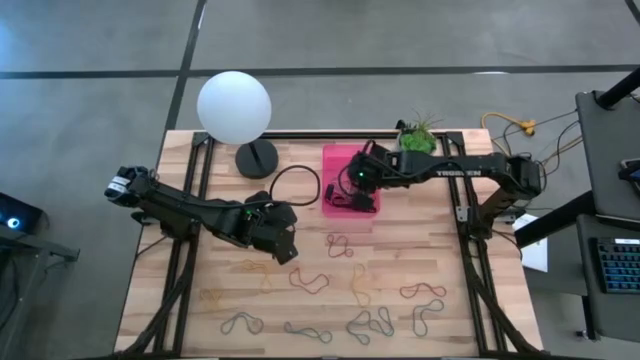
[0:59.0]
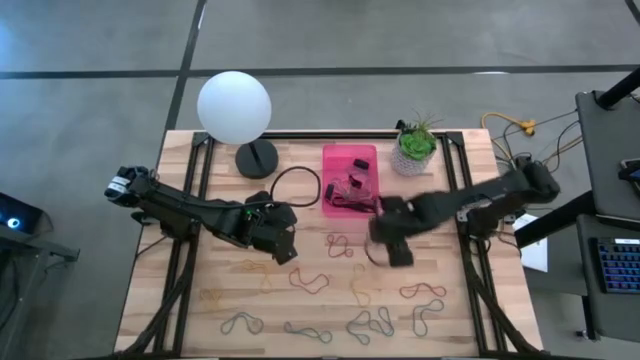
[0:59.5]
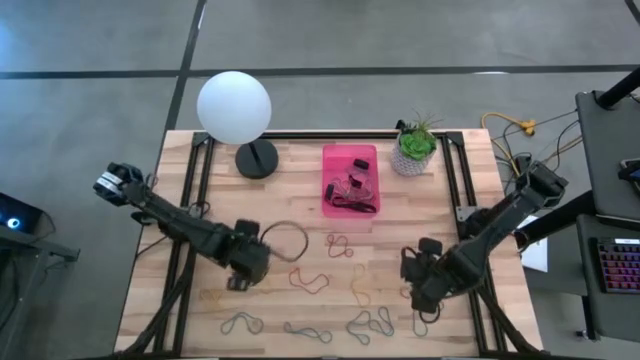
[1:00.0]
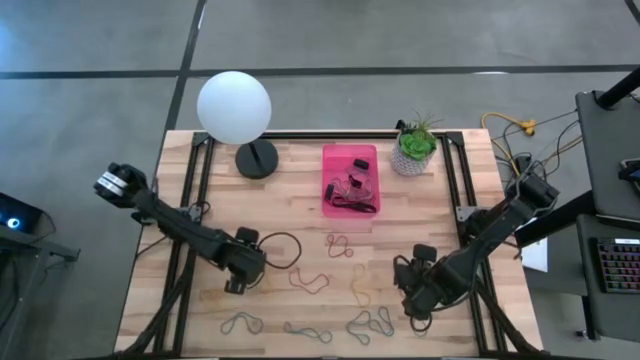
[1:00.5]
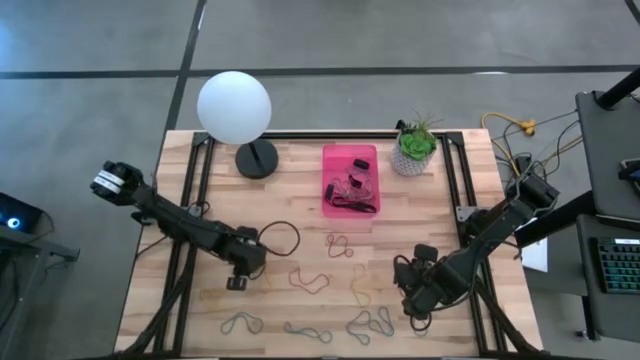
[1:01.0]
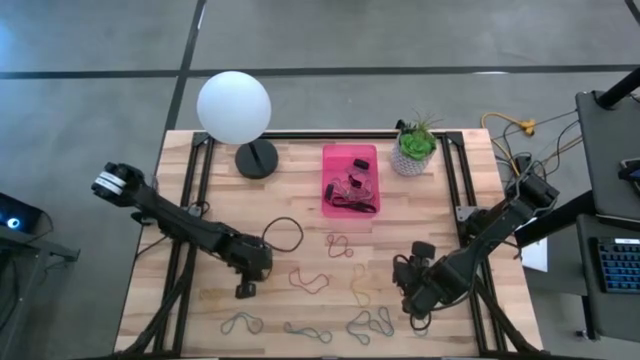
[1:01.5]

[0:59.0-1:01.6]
Task: Pick and place rubber bands into bin
Put the yellow rubber band into the pink bin

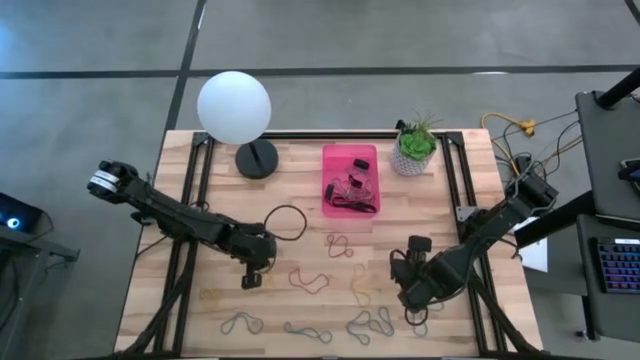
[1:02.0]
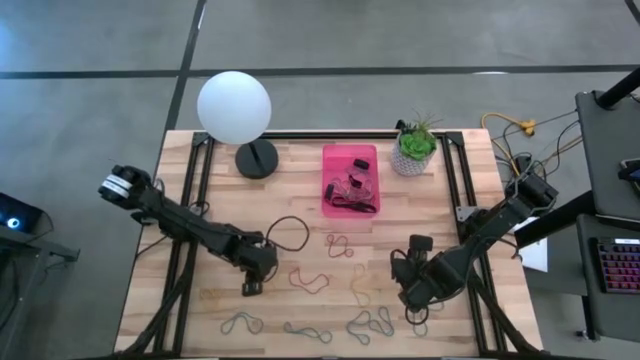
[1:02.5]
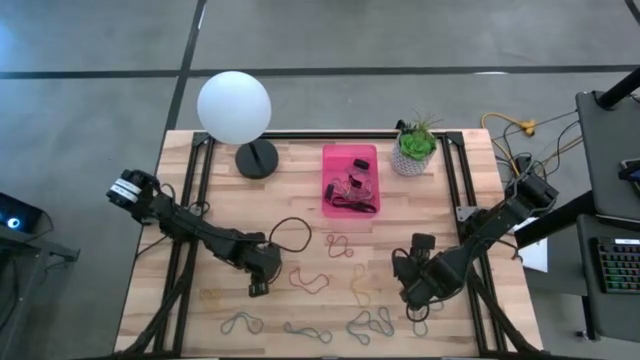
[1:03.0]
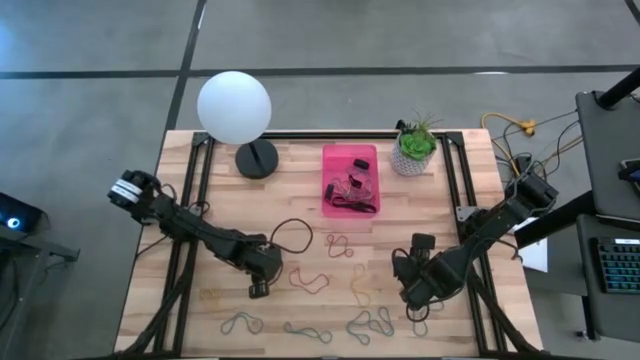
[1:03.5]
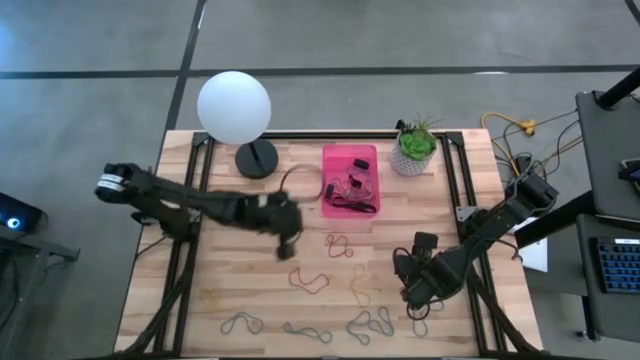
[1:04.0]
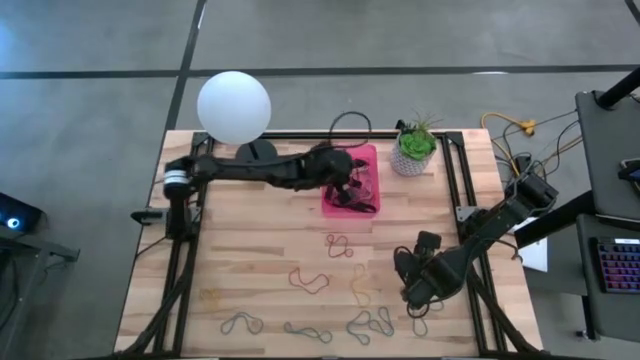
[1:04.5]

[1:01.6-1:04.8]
Put the yellow rubber band into the pink bin

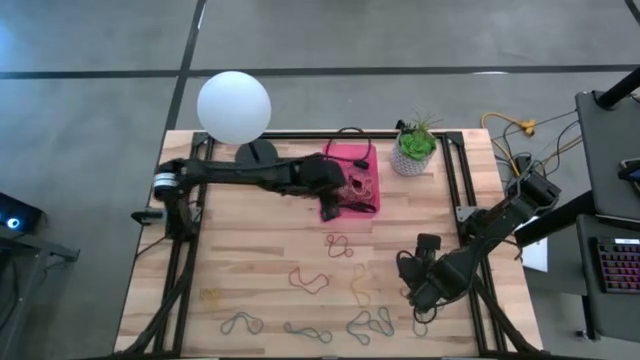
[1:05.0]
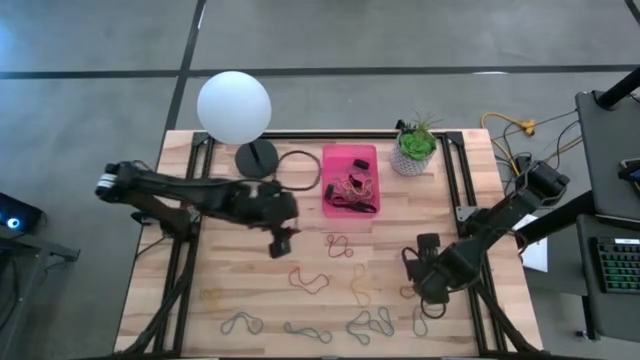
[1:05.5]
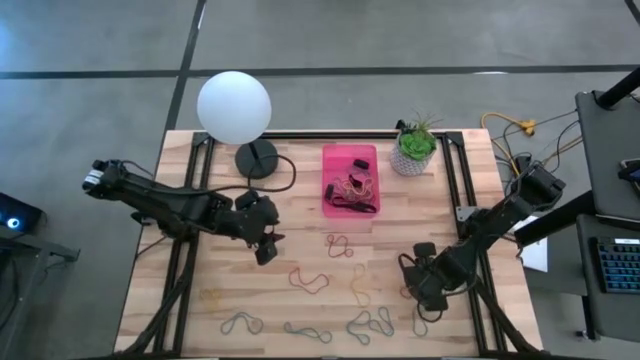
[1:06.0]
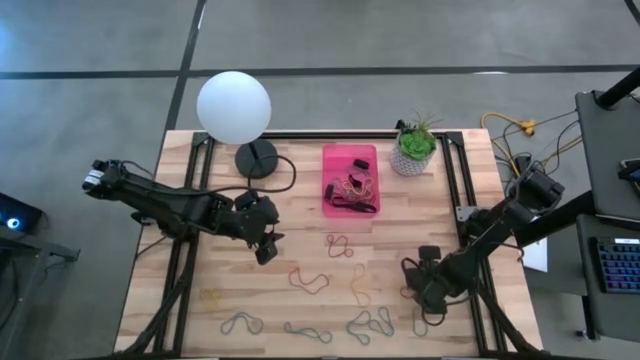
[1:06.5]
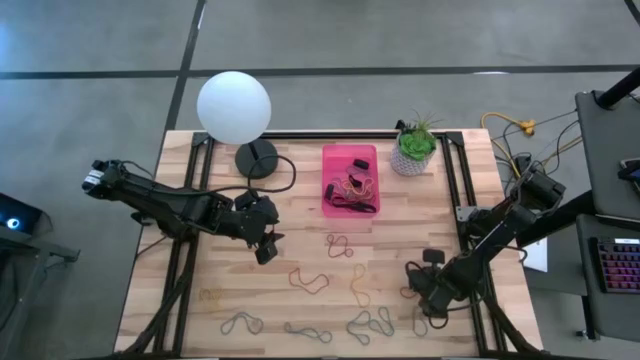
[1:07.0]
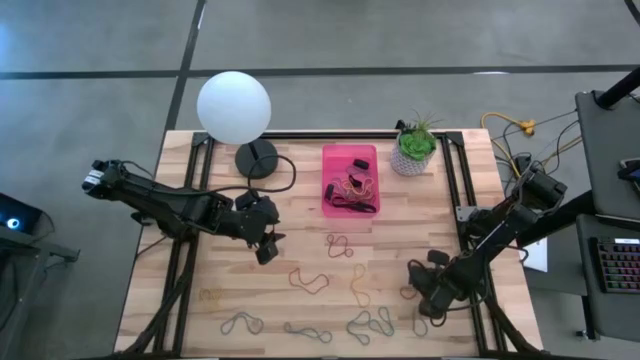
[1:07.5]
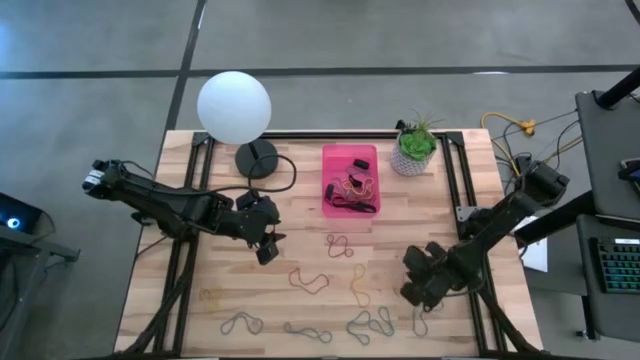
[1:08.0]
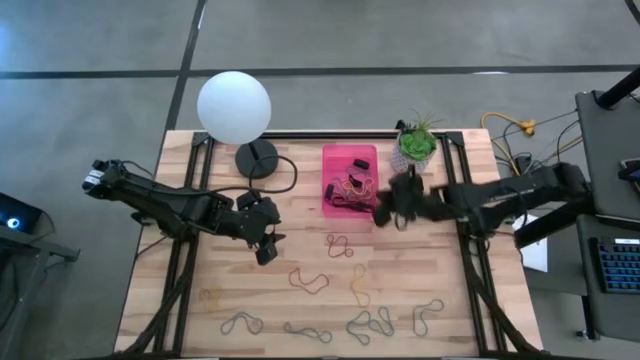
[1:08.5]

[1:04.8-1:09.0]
Put the red rubber band into the pink bin

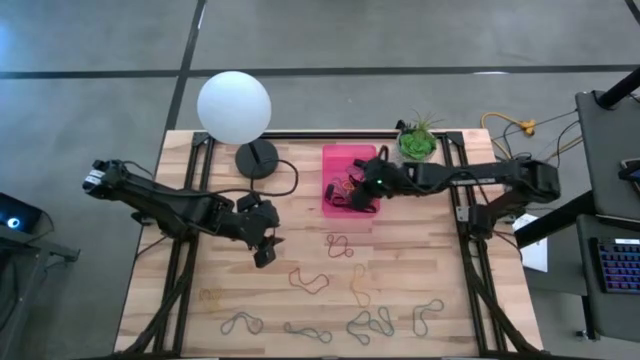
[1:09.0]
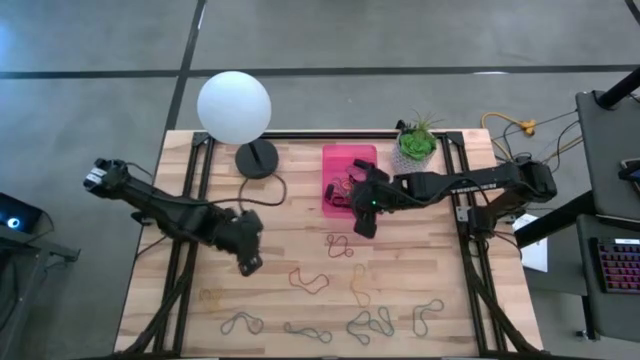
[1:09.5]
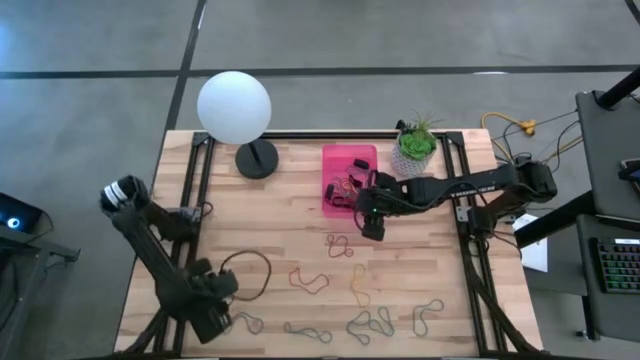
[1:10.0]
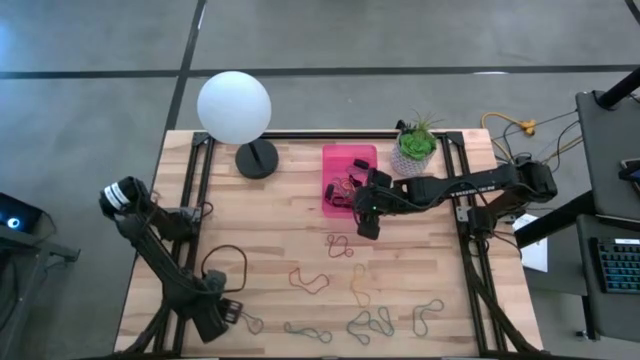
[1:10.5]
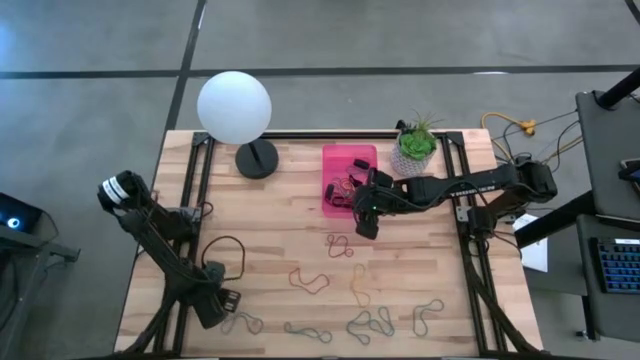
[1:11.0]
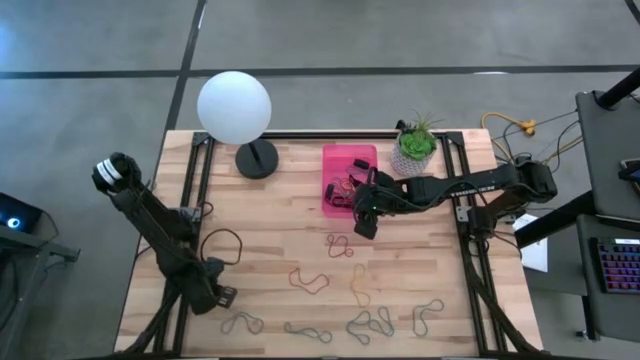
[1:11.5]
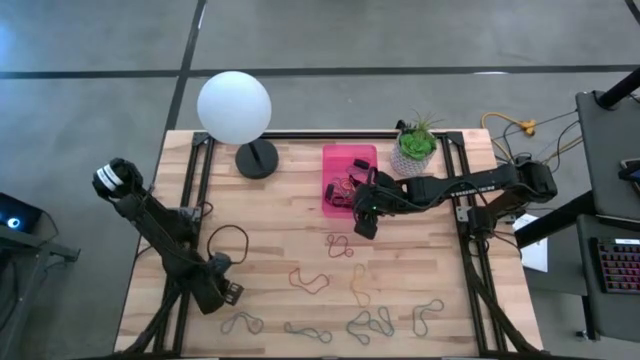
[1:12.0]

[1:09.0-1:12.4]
Put the yellow rubber band into the pink bin

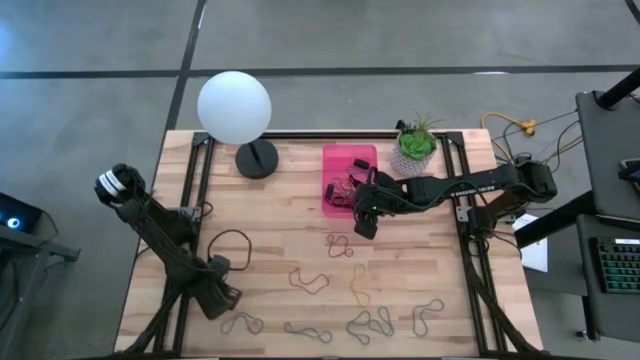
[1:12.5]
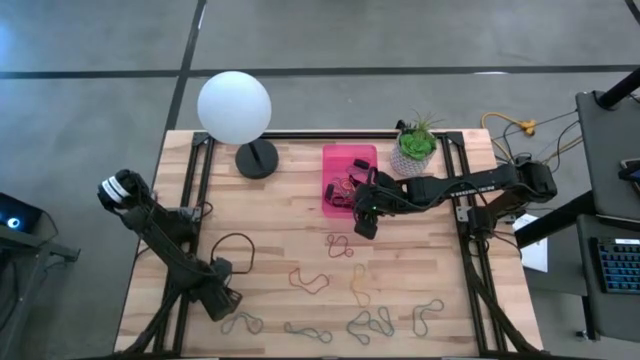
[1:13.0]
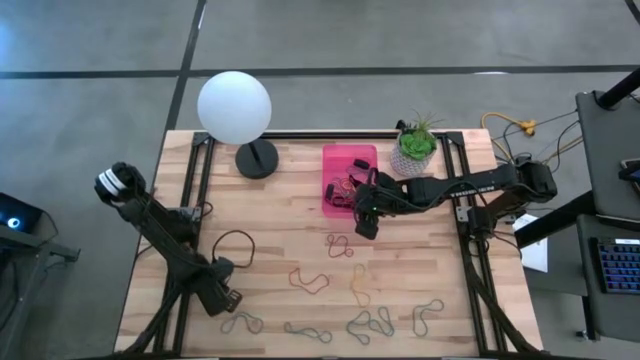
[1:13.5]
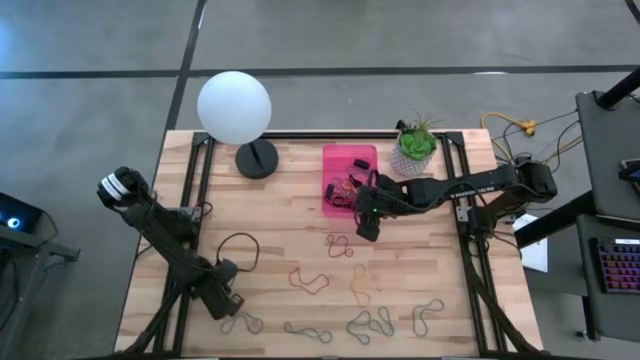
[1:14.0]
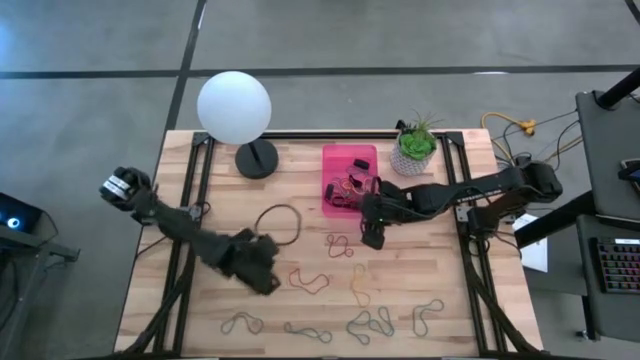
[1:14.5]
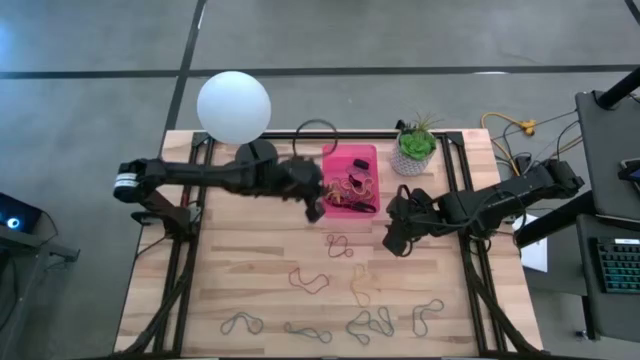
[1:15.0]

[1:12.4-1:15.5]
Put the yellow rubber band into the pink bin

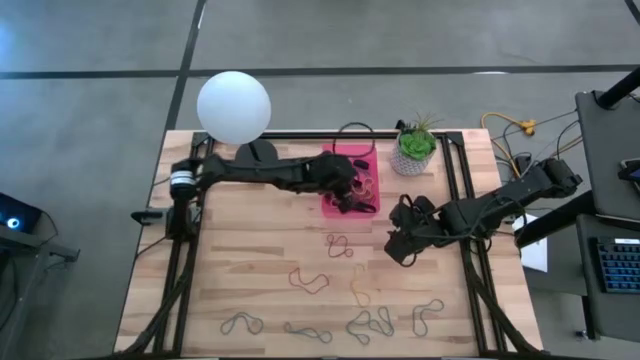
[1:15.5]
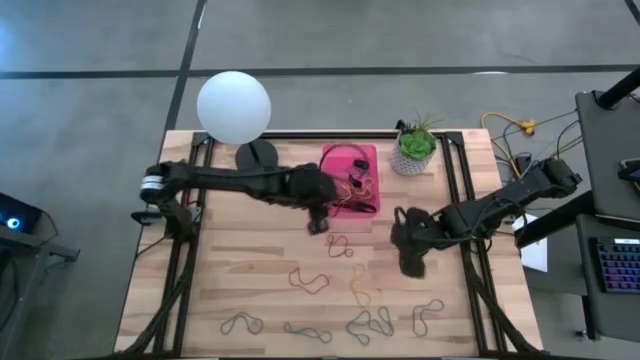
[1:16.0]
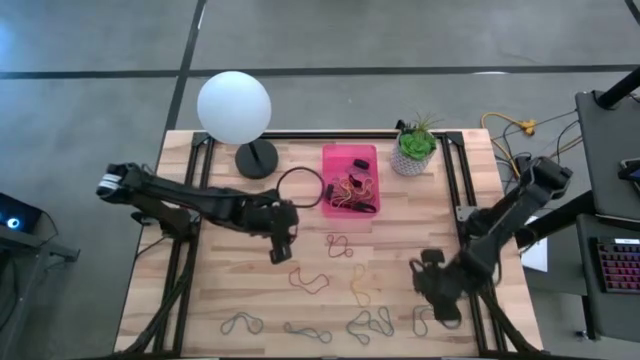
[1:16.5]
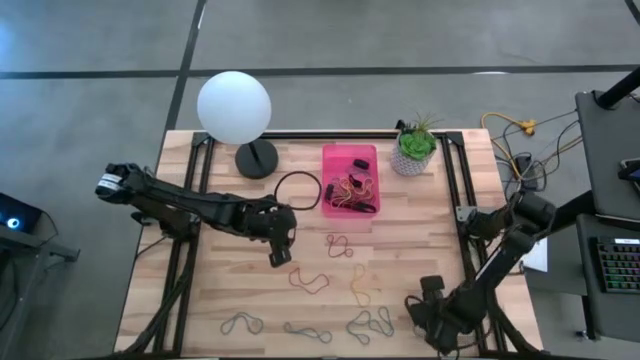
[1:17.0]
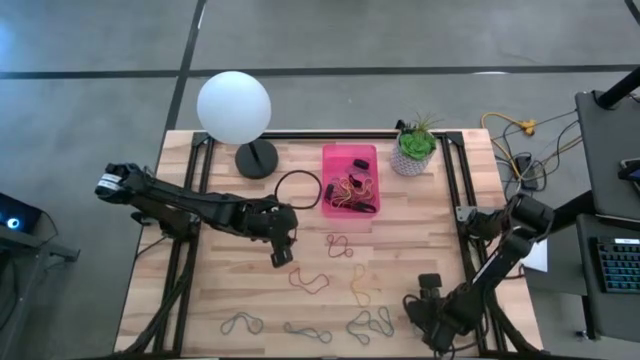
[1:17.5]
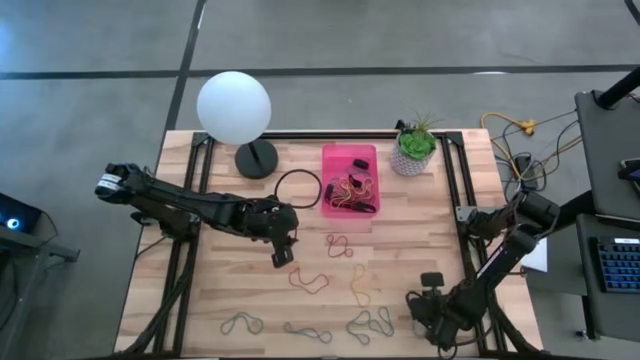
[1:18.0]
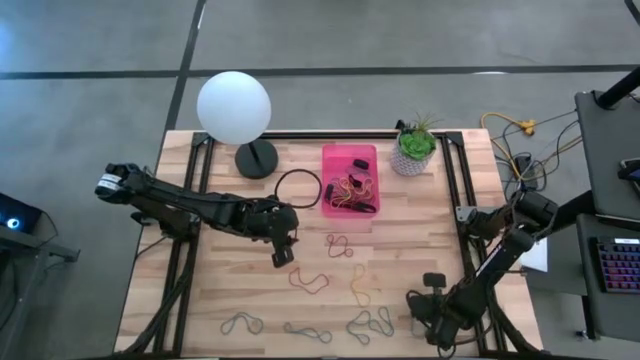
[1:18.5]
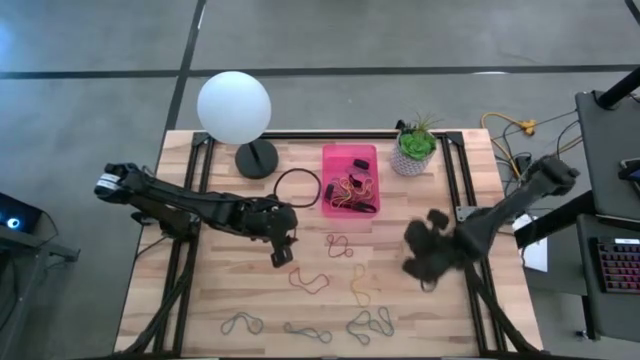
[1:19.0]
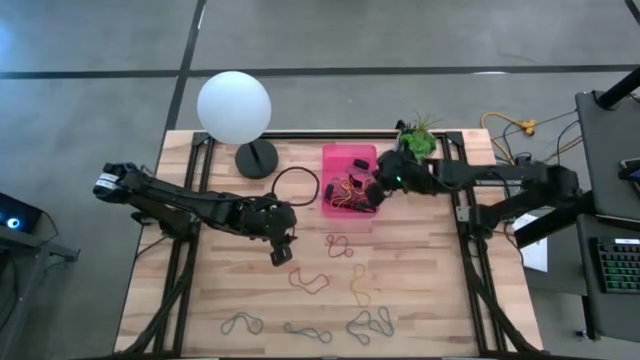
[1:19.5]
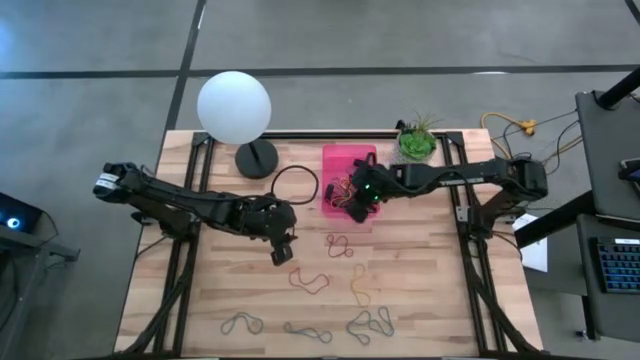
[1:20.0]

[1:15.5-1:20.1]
Put the blue rubber band into the pink bin
